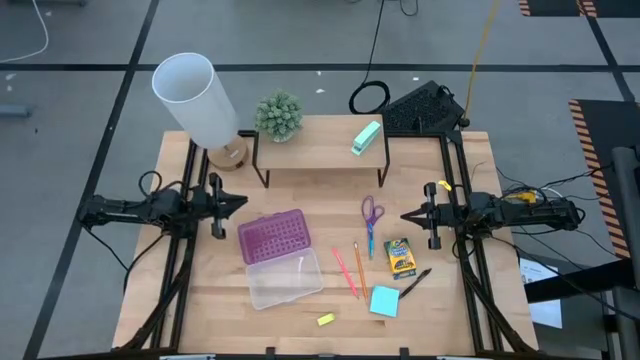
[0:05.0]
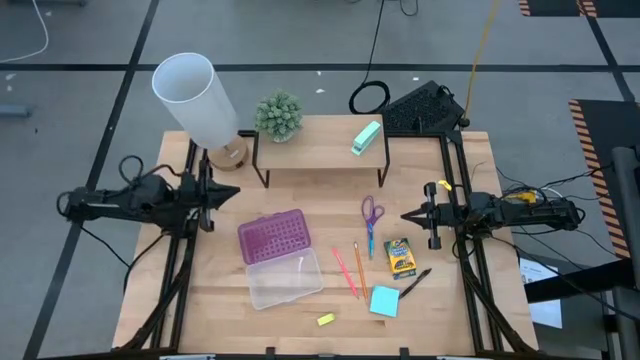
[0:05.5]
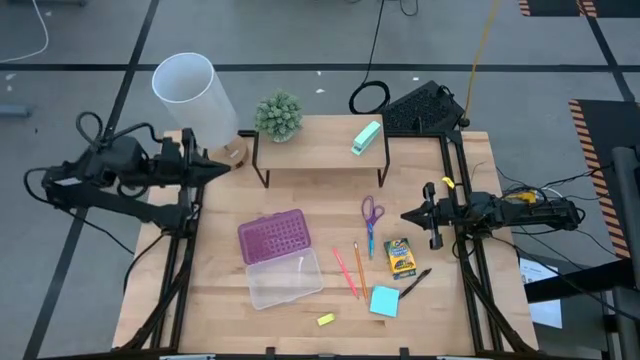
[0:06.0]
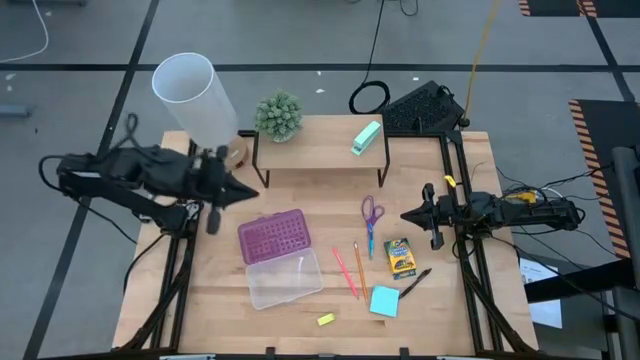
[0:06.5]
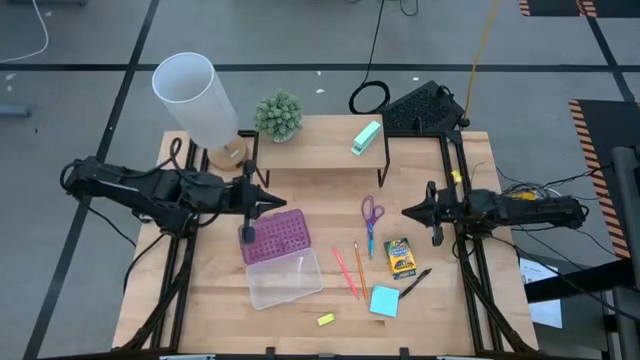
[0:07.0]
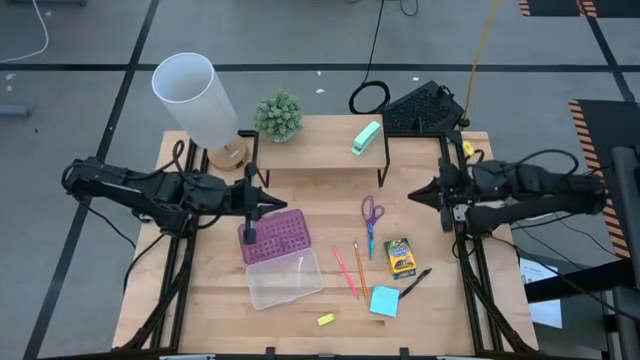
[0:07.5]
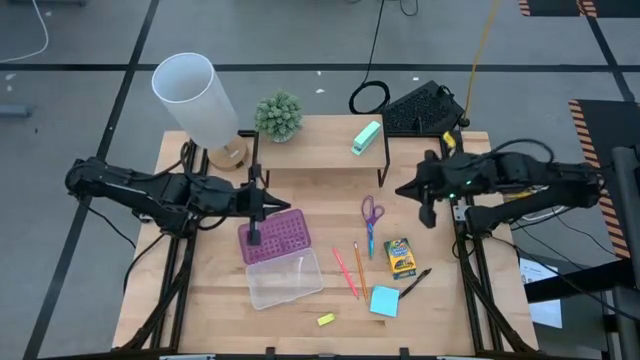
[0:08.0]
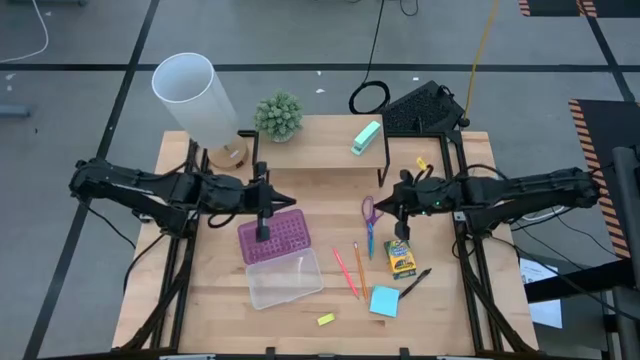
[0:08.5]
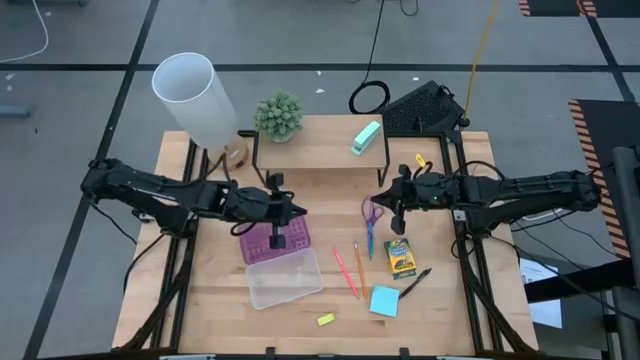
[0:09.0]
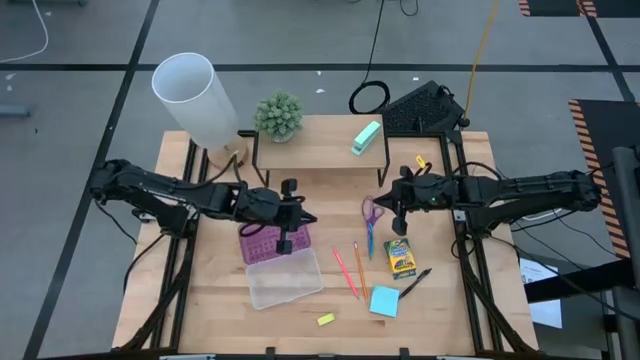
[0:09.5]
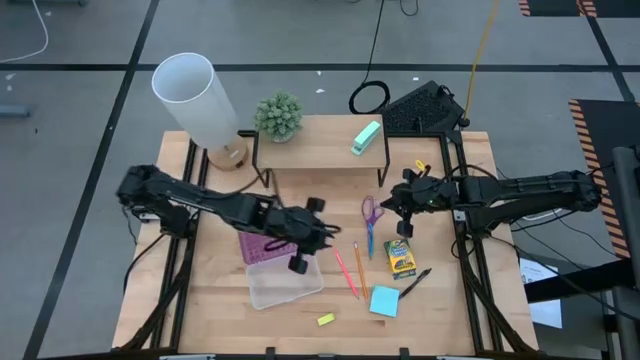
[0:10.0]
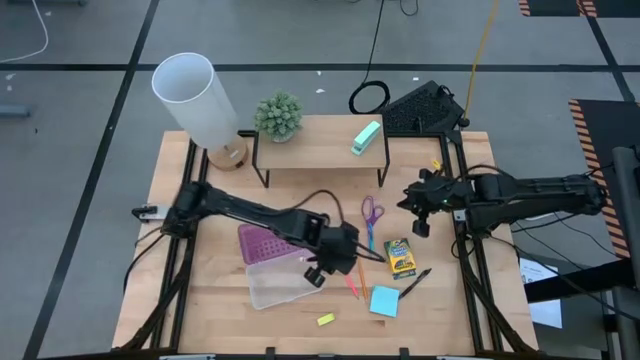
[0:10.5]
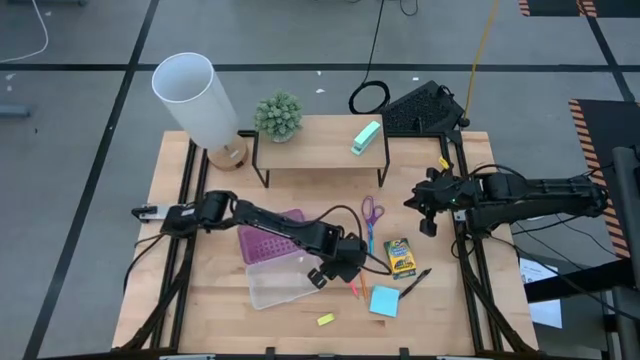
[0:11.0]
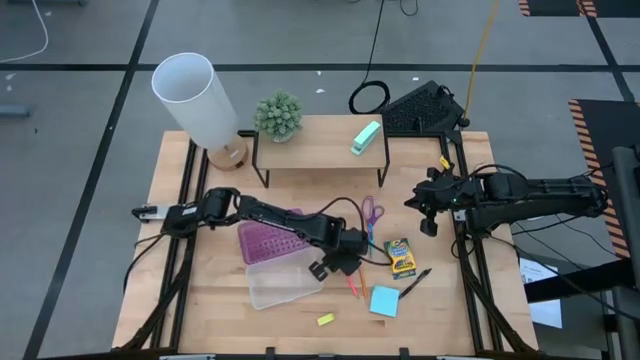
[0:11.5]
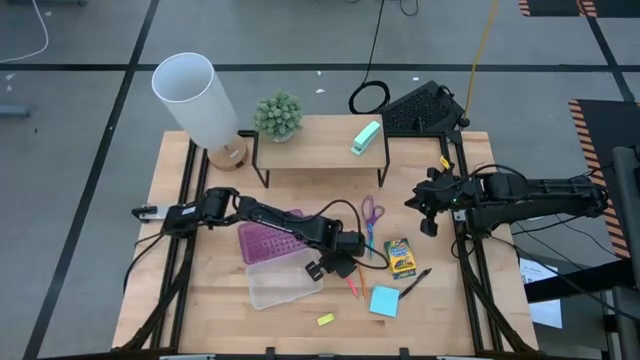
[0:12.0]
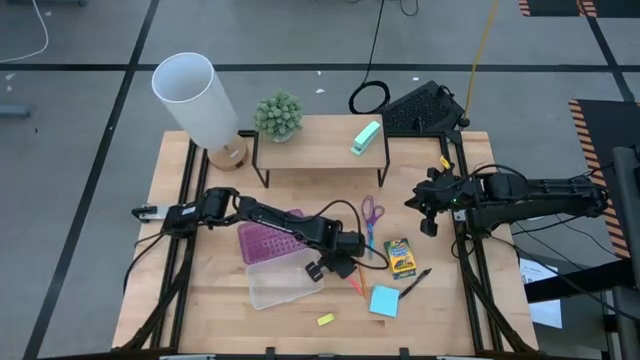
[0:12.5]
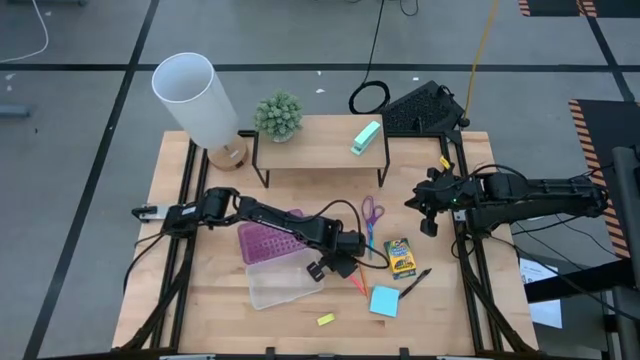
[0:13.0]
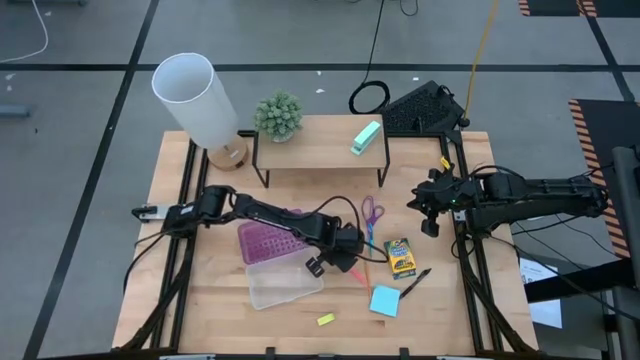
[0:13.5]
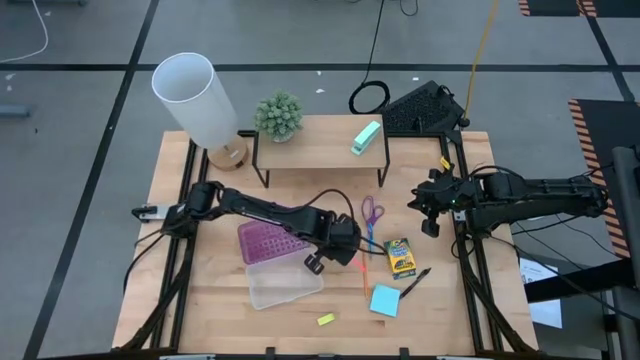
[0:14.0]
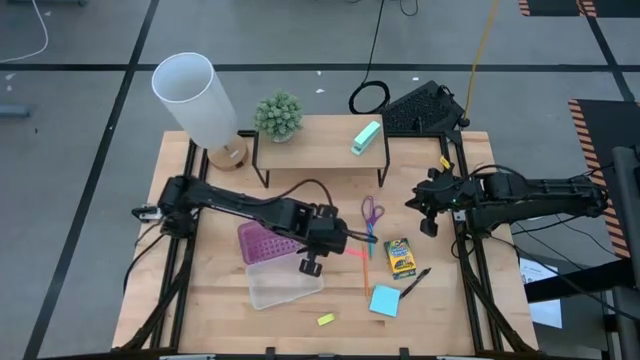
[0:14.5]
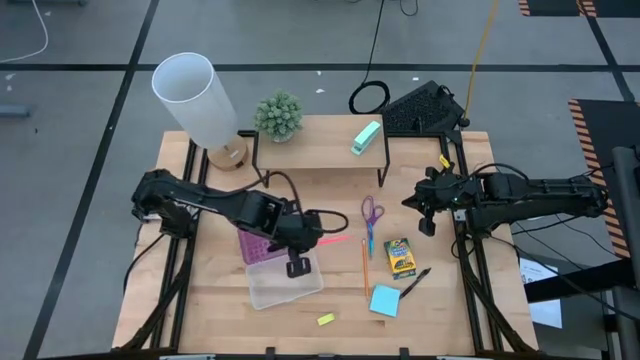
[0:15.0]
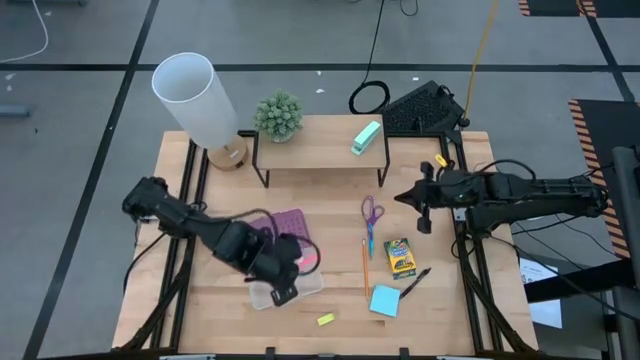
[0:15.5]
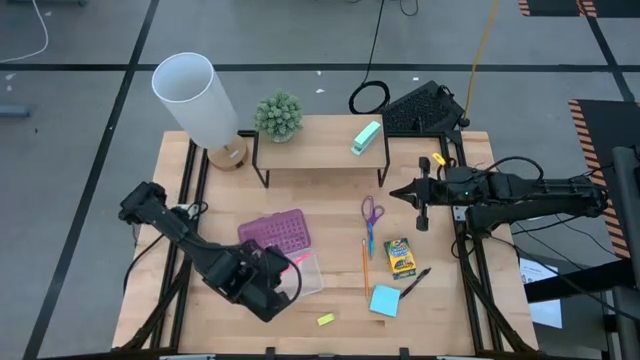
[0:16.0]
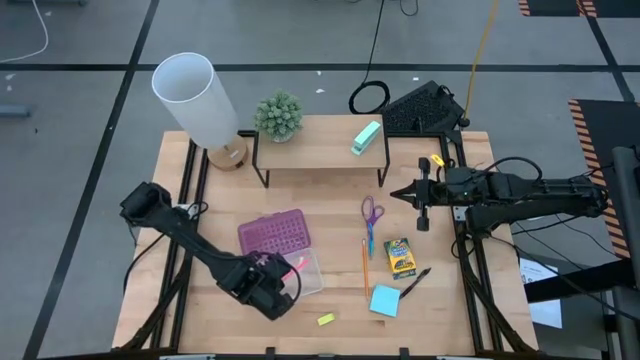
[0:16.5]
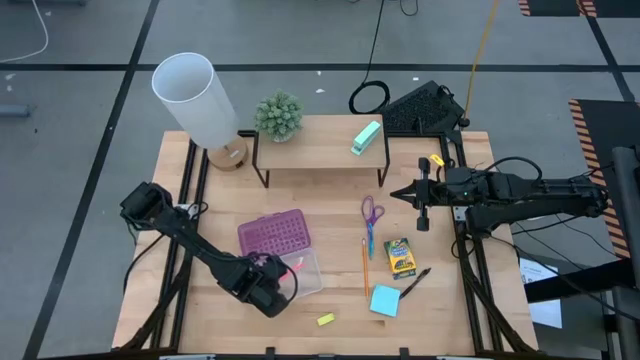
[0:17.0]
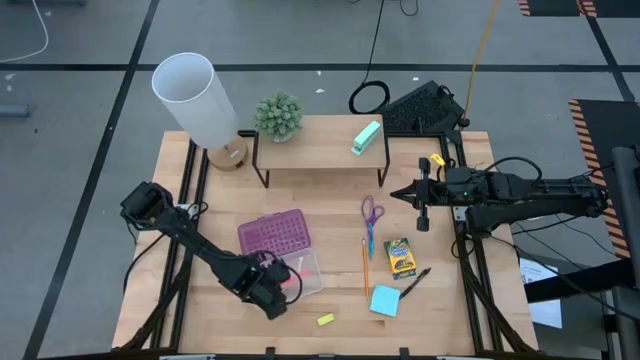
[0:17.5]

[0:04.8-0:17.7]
Task: Pack school essentials
Put the pink pencil into the transparent box

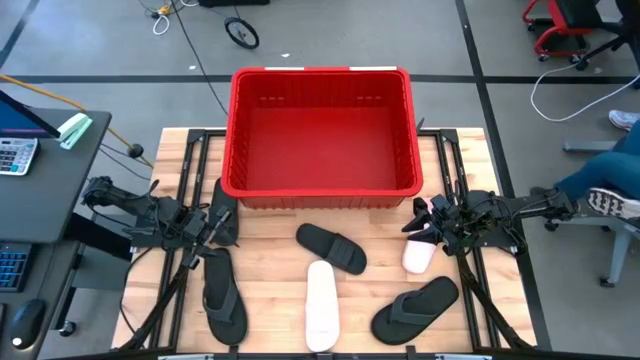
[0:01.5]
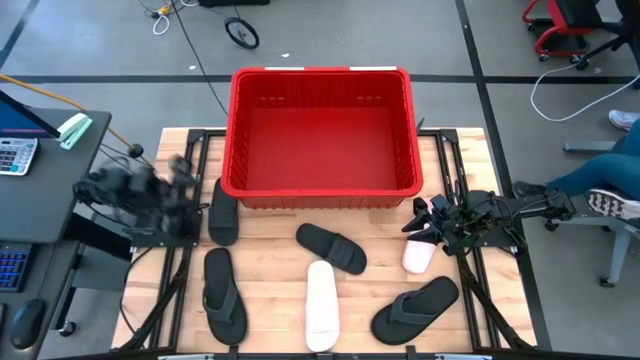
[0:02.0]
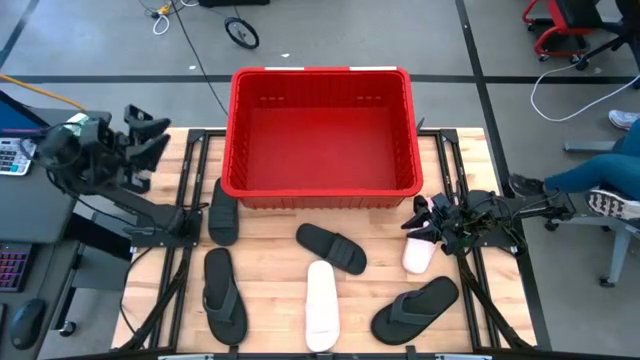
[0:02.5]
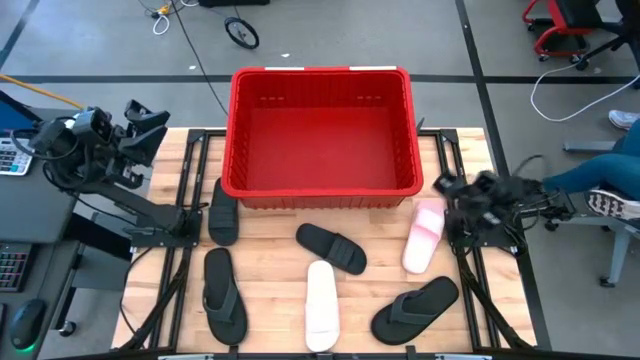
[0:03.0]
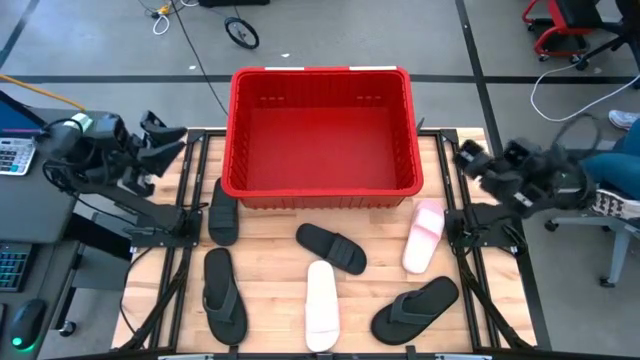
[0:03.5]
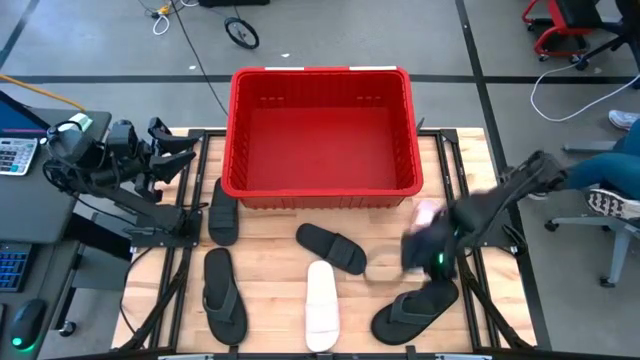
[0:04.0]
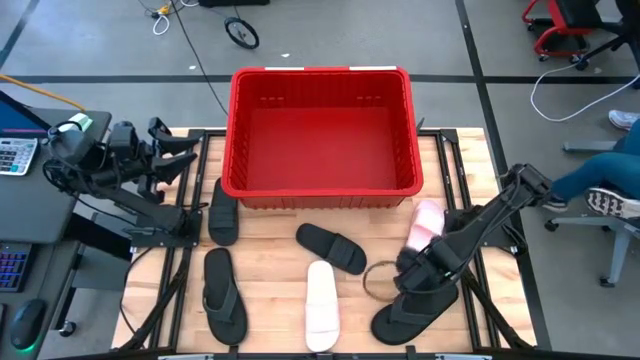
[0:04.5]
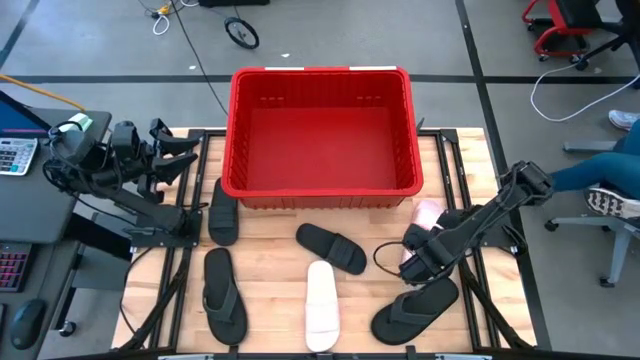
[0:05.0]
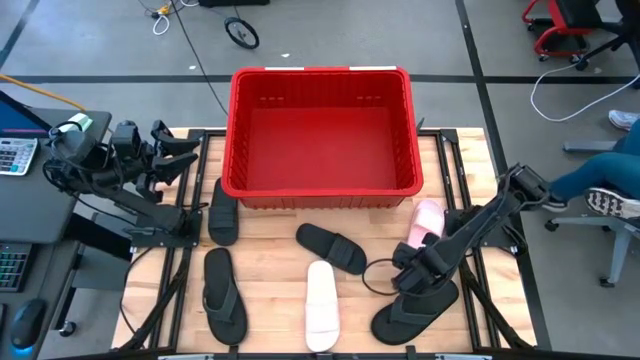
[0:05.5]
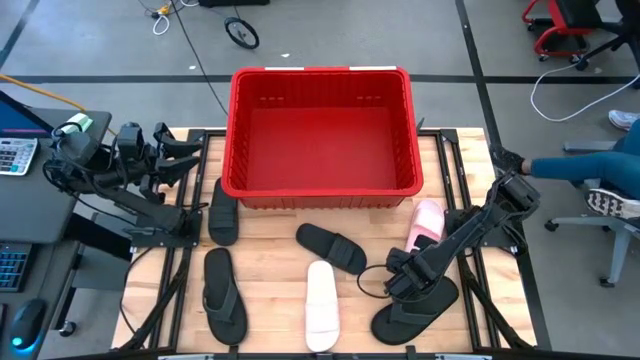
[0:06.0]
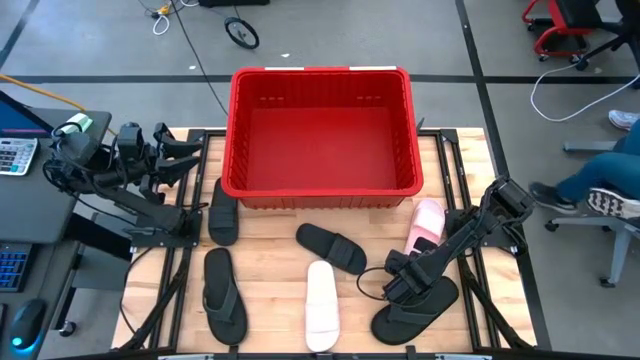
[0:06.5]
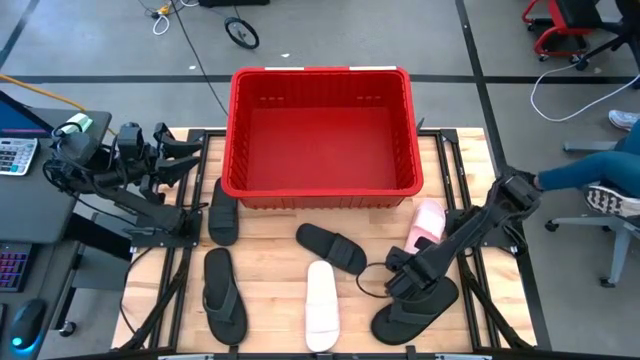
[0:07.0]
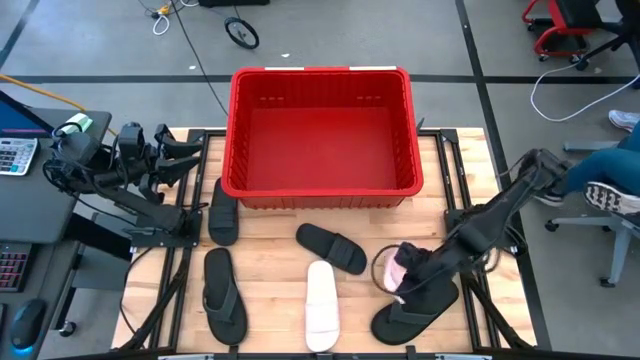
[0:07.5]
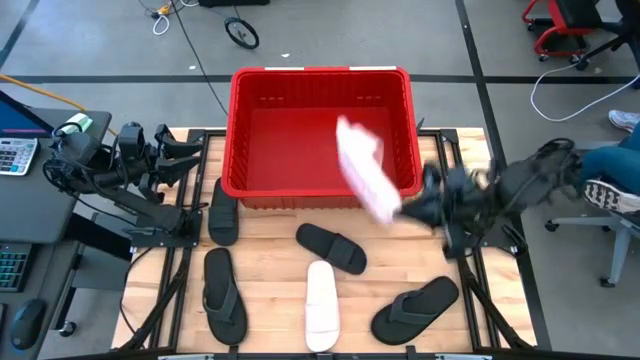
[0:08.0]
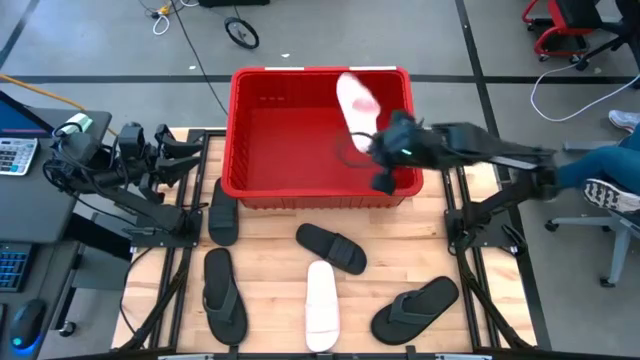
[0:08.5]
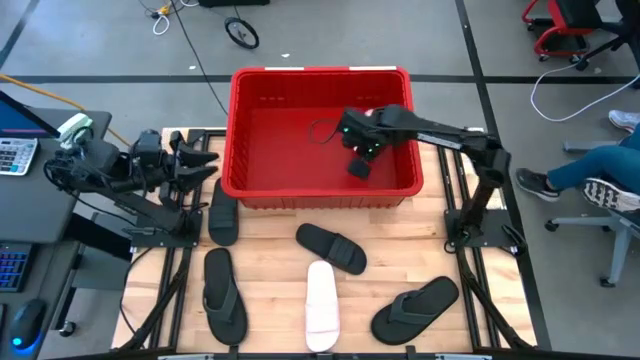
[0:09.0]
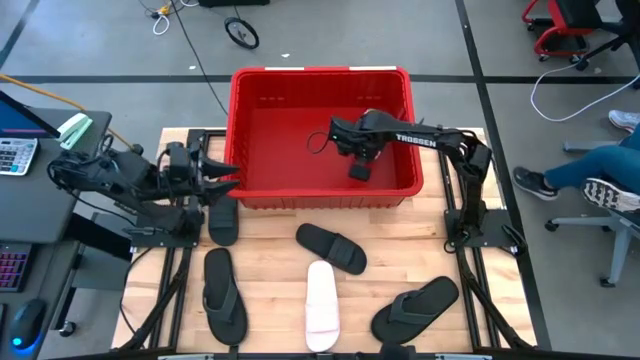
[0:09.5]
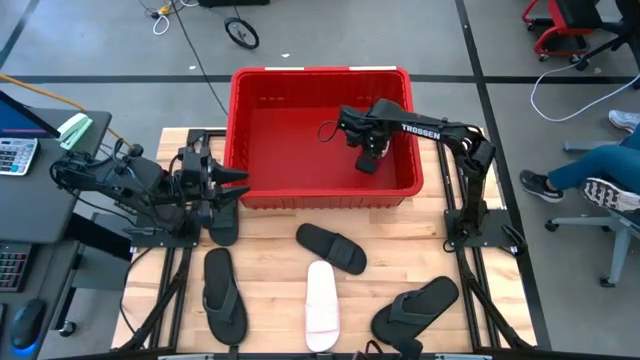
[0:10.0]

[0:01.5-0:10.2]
Task: Pick and place slides into bin
Put the right pink slipper into the red bin
